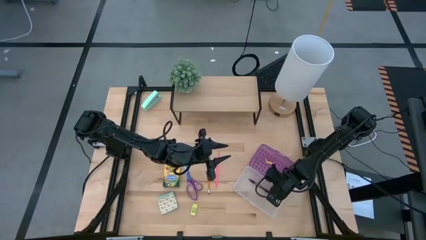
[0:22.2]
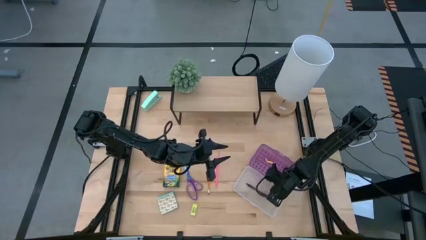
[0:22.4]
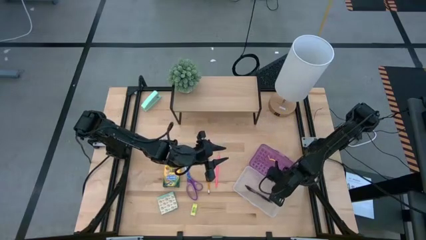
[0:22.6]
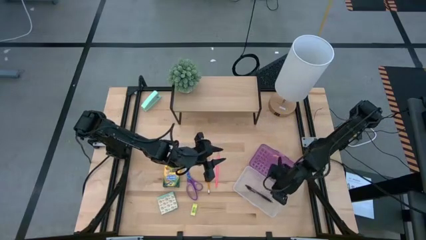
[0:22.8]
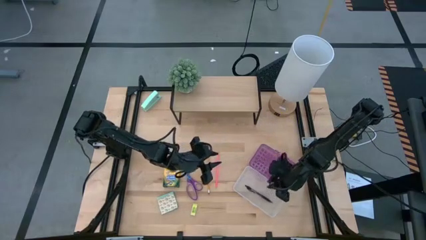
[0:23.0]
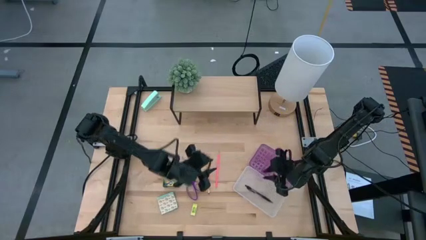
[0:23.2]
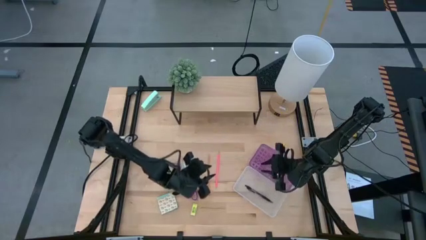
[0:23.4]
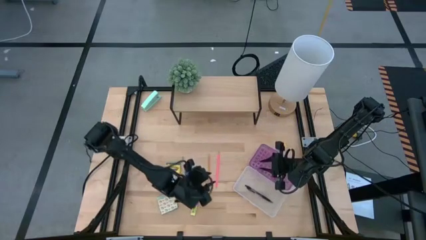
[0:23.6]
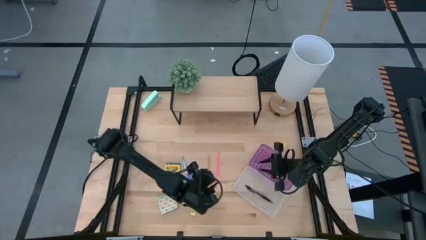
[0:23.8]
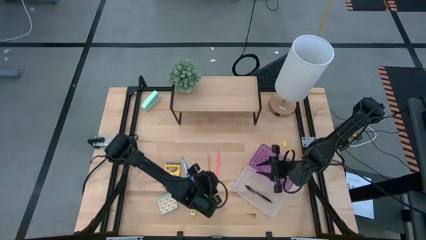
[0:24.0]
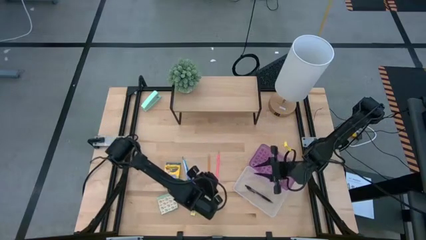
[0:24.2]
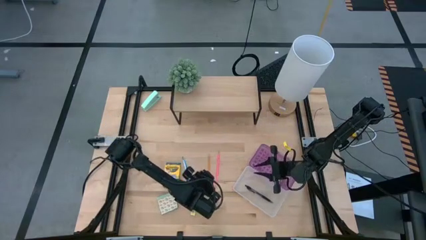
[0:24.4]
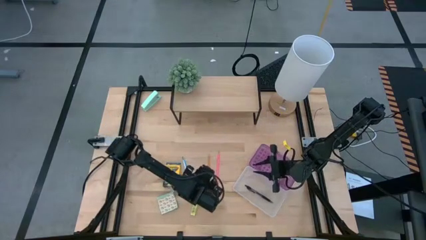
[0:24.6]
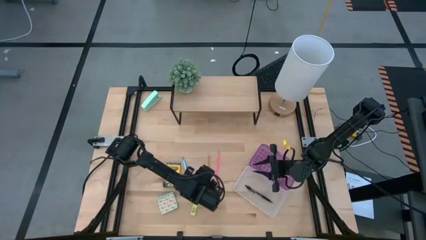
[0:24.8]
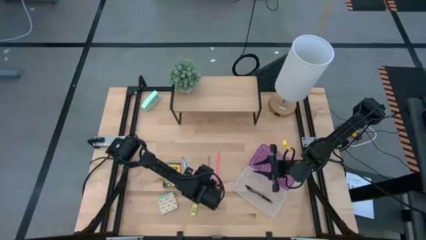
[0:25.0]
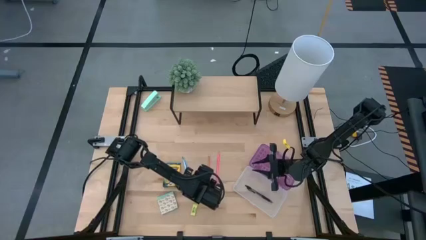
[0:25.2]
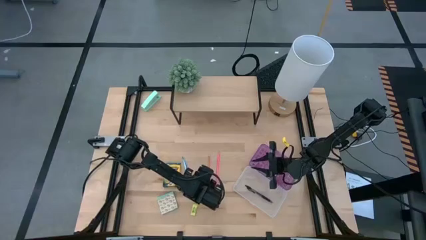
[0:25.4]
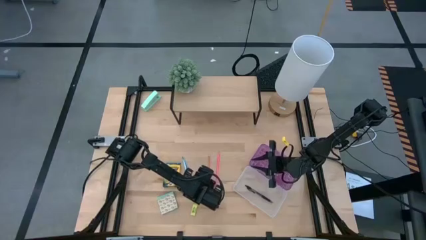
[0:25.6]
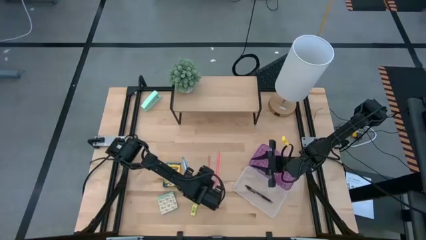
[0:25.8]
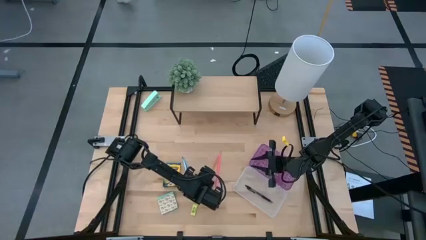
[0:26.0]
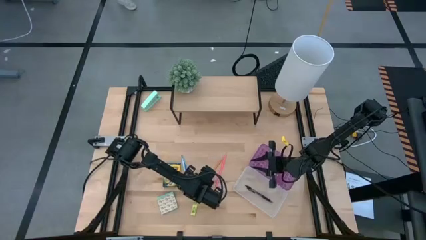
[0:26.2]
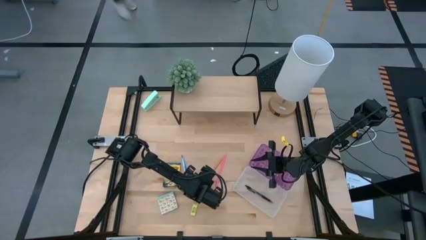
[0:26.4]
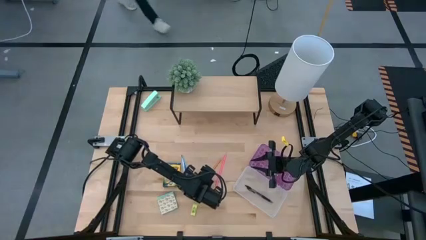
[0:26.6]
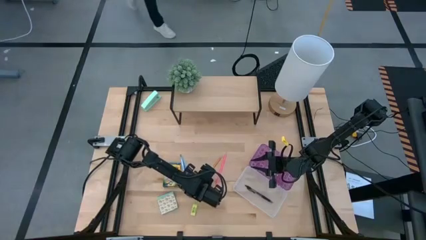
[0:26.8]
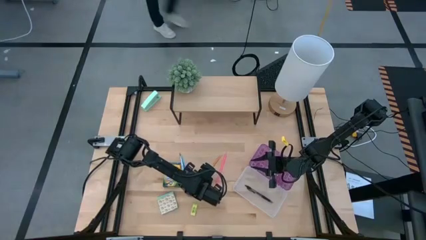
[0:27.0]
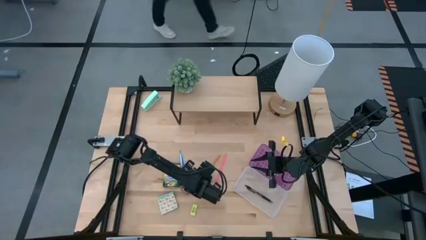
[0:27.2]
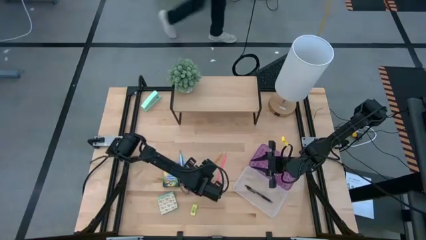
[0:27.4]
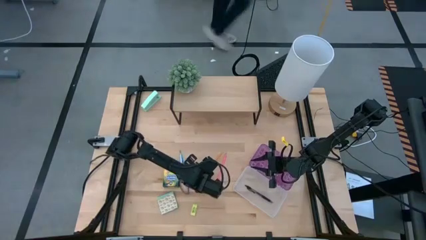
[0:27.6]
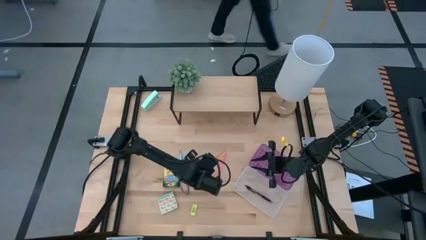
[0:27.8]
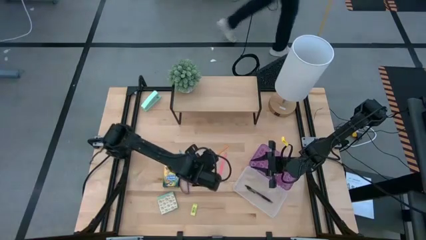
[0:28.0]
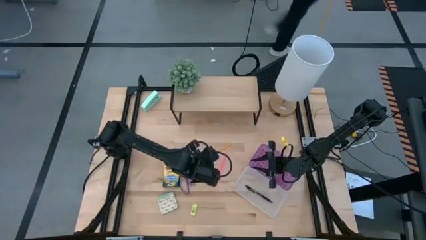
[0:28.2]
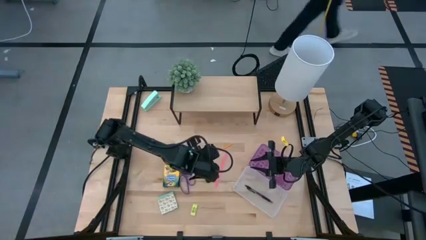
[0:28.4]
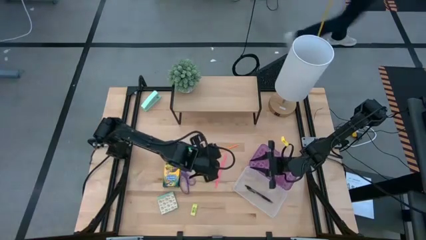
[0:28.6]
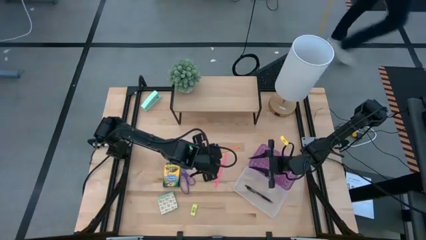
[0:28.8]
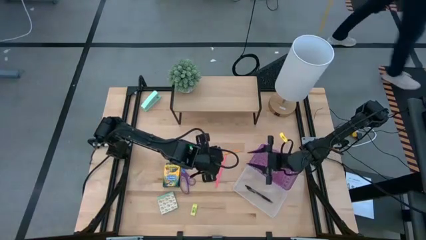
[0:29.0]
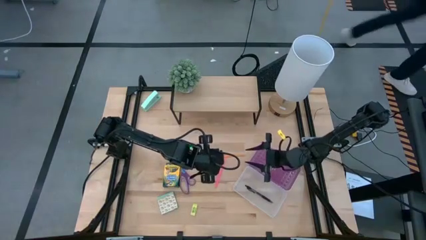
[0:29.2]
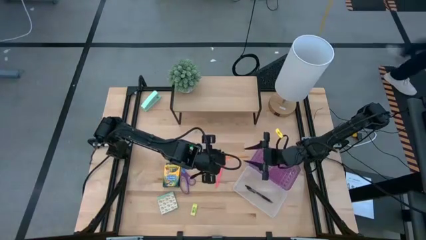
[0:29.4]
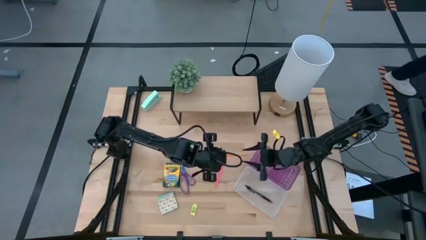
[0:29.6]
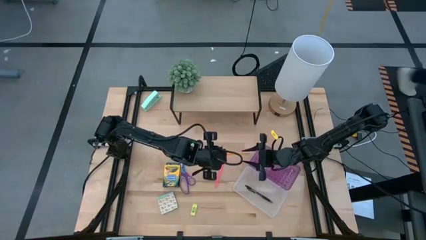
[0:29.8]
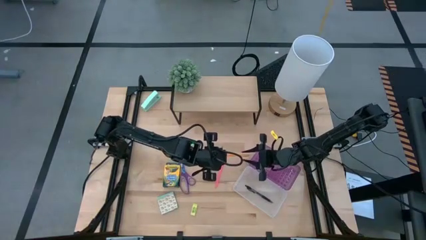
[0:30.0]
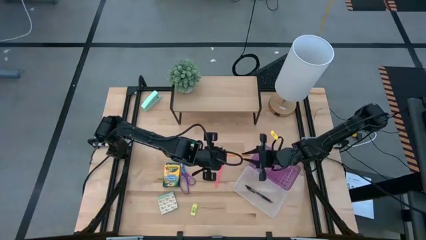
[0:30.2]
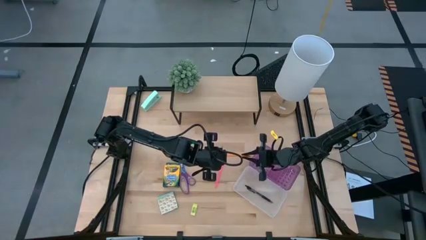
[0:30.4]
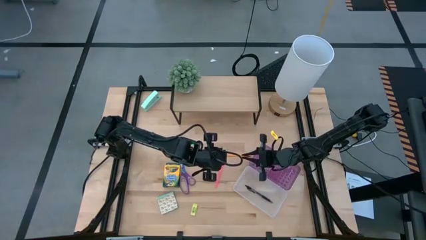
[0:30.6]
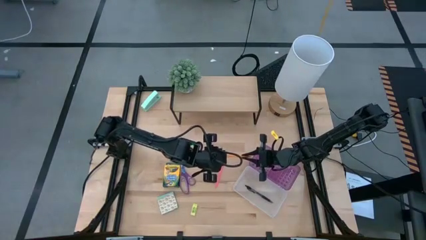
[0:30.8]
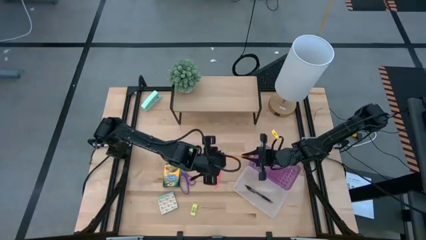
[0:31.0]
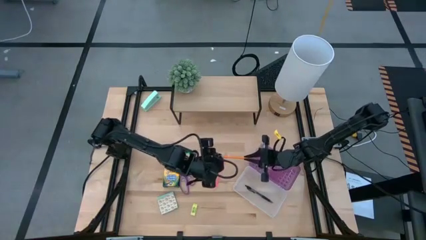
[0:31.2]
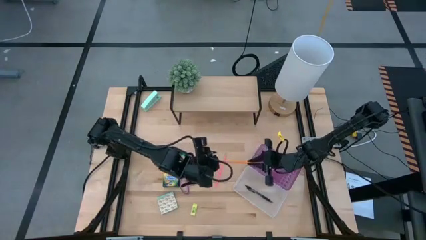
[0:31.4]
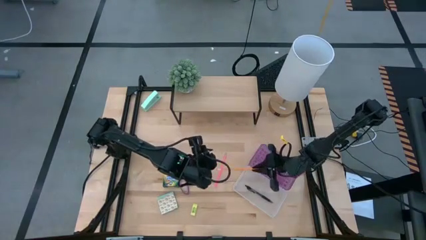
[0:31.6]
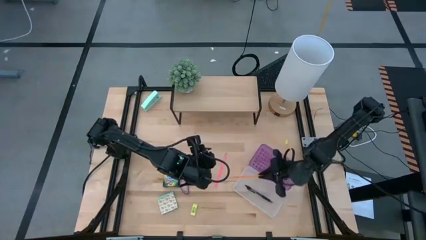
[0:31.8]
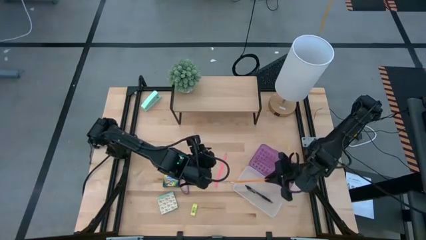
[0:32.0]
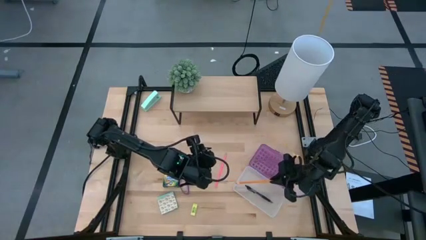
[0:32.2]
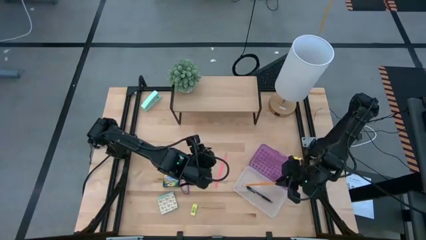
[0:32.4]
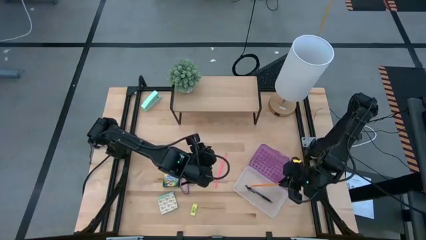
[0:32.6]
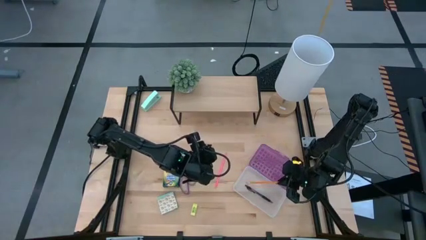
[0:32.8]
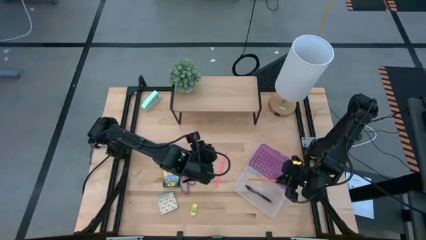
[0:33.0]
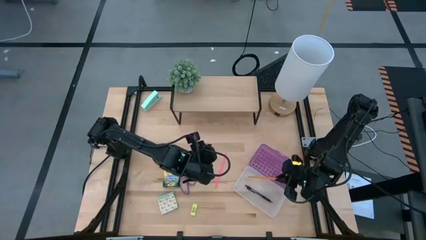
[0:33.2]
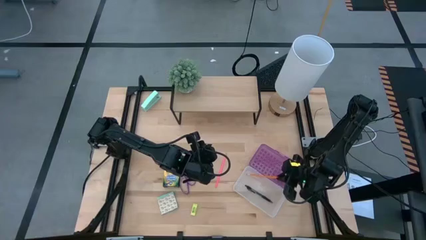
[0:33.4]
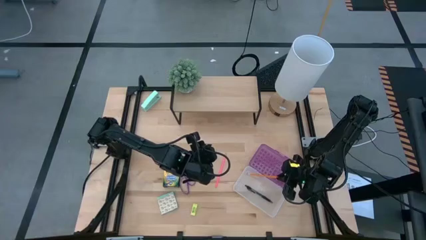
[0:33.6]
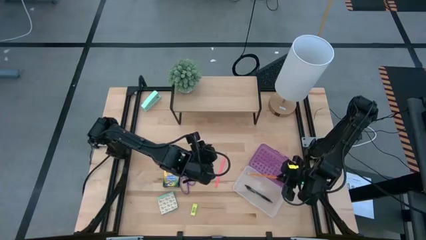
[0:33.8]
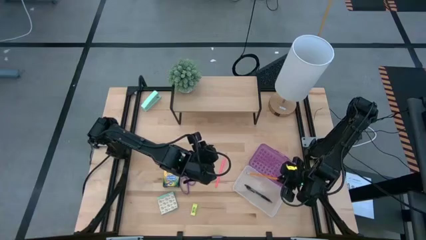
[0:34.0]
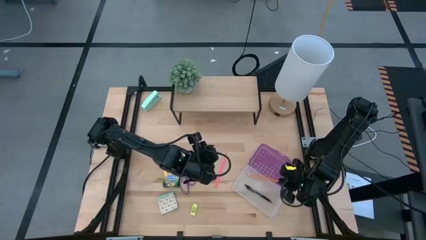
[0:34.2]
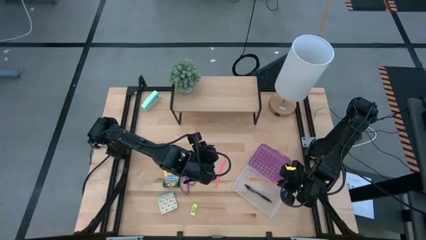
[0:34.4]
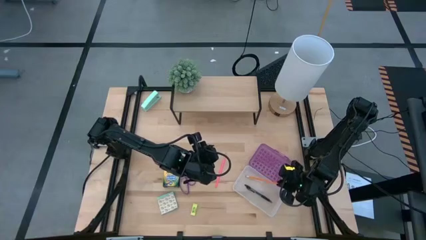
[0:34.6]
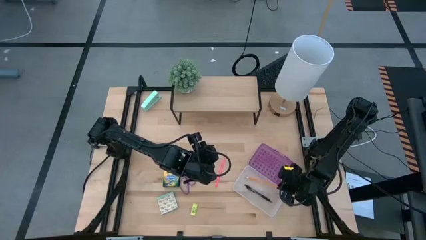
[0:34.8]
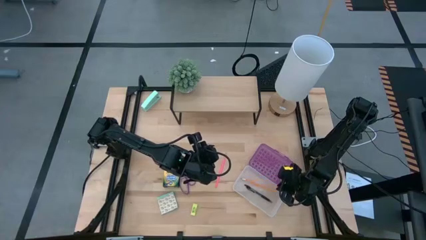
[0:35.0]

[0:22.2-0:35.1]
Task: Pack school essentials
Put the orange pencil into the purple supply box
